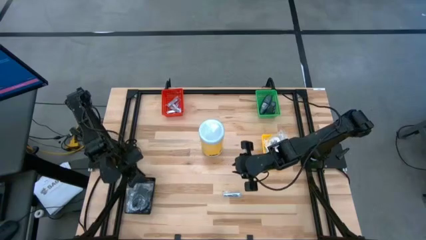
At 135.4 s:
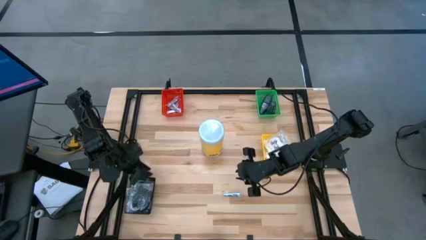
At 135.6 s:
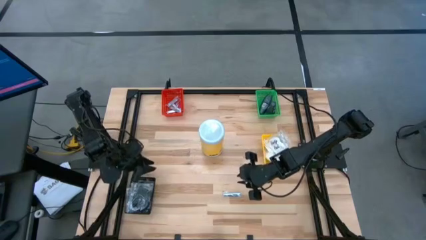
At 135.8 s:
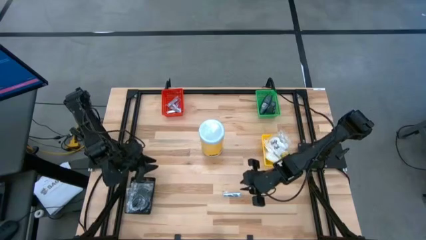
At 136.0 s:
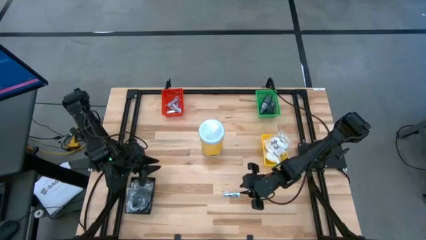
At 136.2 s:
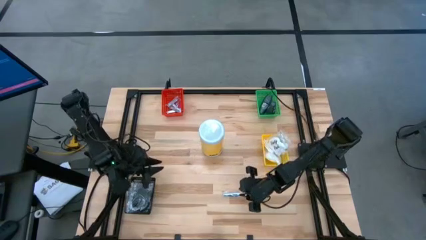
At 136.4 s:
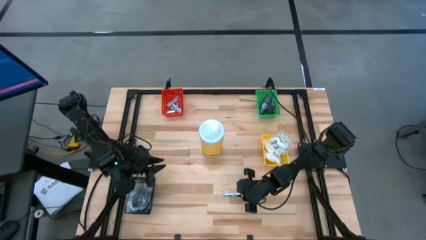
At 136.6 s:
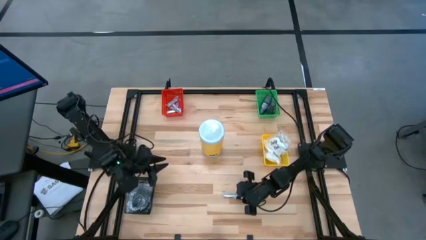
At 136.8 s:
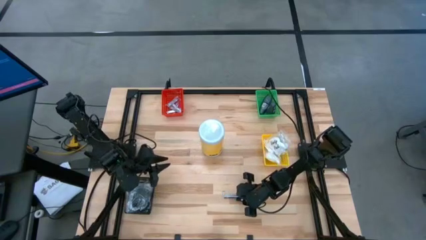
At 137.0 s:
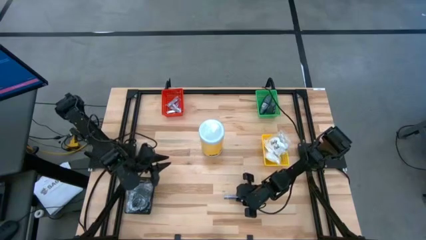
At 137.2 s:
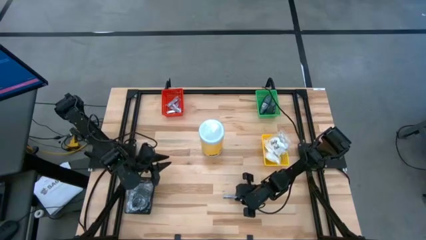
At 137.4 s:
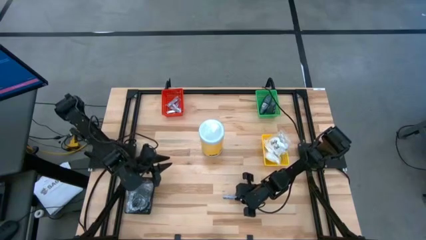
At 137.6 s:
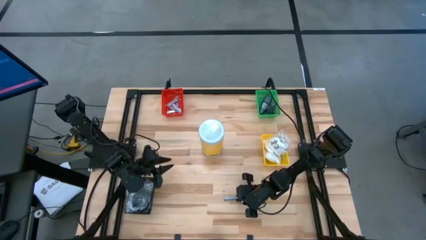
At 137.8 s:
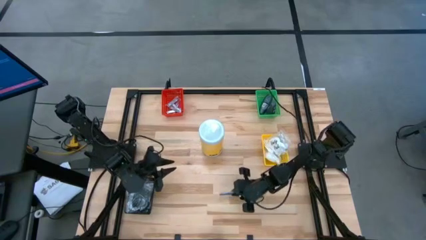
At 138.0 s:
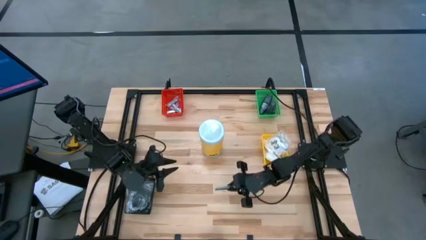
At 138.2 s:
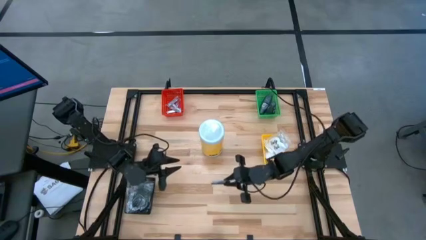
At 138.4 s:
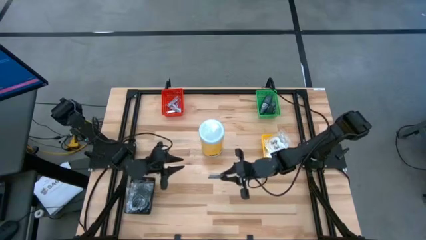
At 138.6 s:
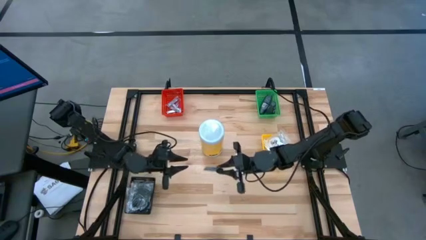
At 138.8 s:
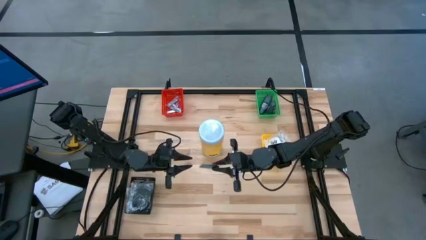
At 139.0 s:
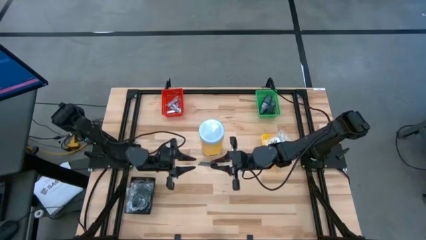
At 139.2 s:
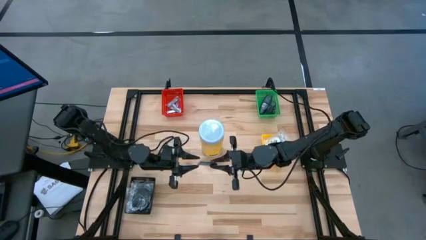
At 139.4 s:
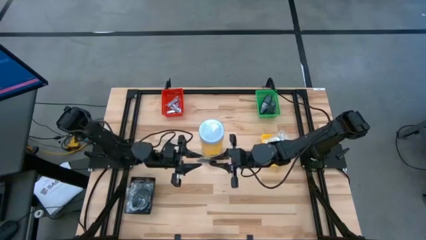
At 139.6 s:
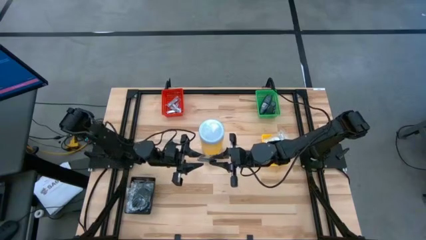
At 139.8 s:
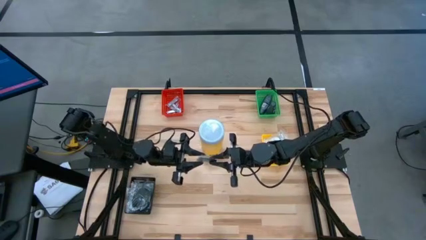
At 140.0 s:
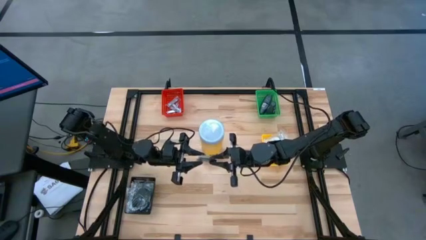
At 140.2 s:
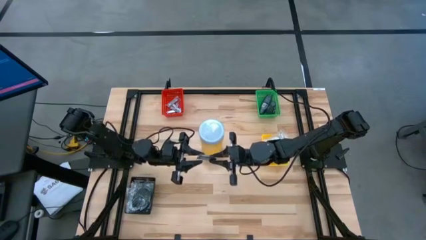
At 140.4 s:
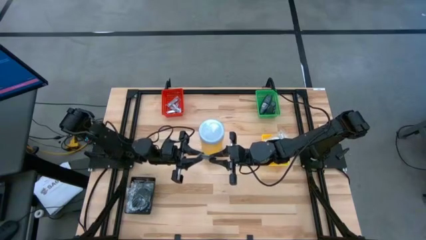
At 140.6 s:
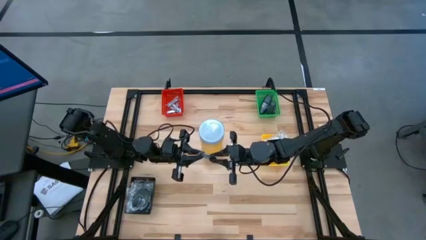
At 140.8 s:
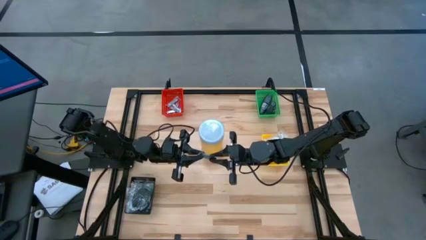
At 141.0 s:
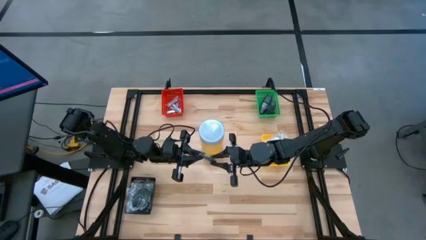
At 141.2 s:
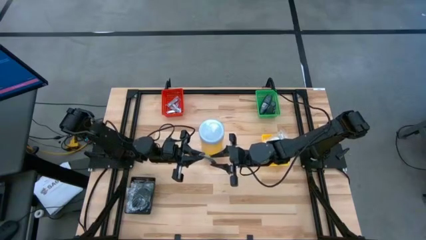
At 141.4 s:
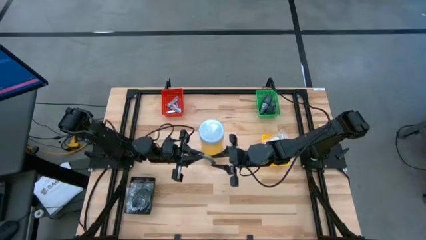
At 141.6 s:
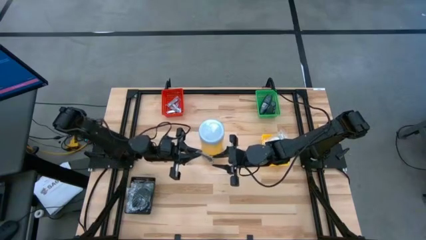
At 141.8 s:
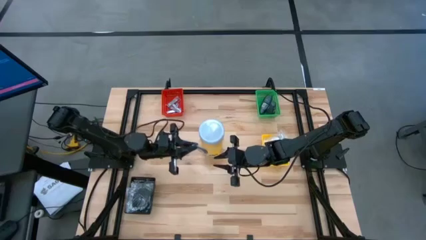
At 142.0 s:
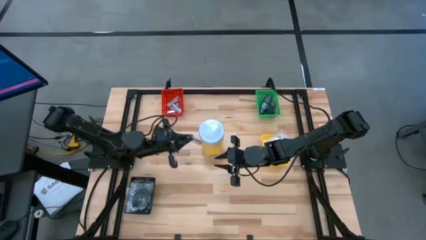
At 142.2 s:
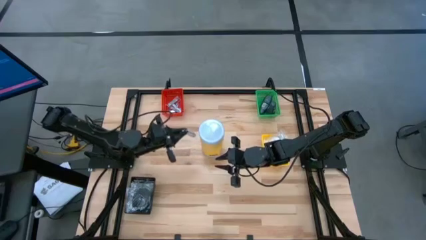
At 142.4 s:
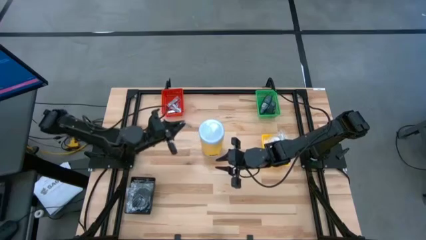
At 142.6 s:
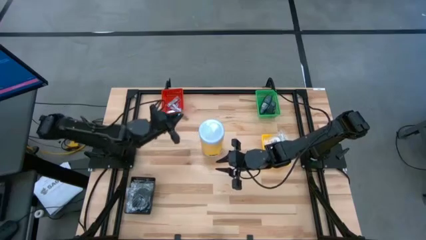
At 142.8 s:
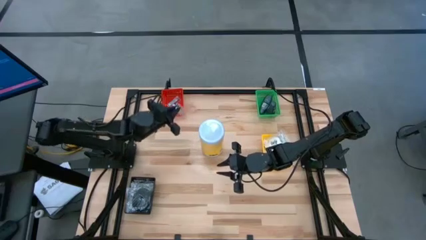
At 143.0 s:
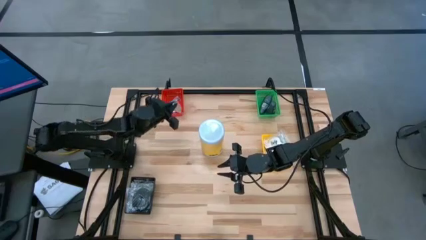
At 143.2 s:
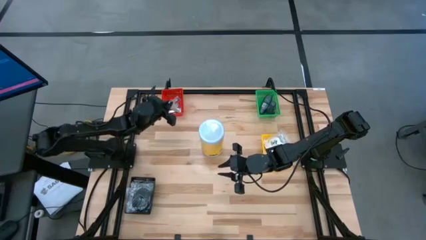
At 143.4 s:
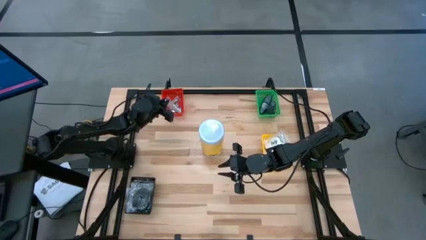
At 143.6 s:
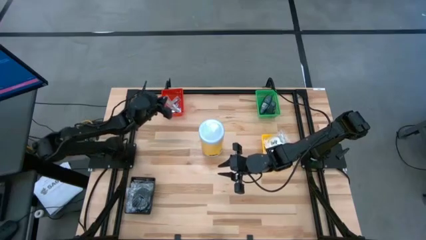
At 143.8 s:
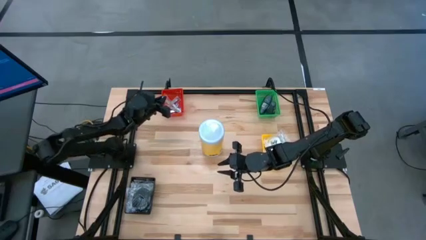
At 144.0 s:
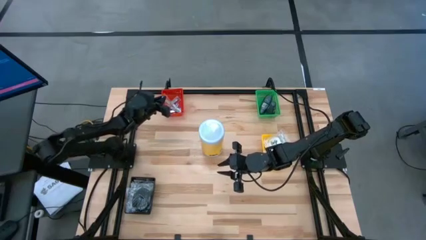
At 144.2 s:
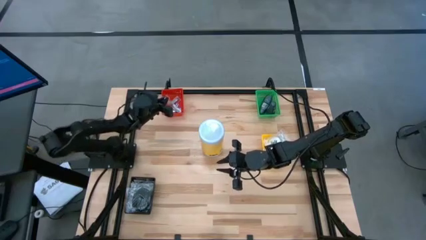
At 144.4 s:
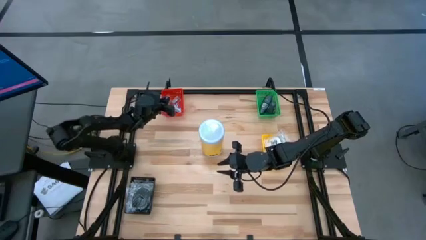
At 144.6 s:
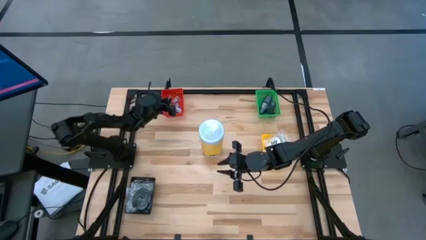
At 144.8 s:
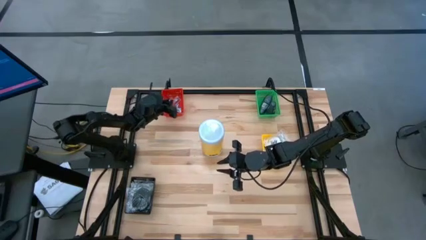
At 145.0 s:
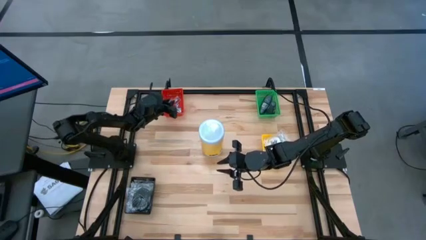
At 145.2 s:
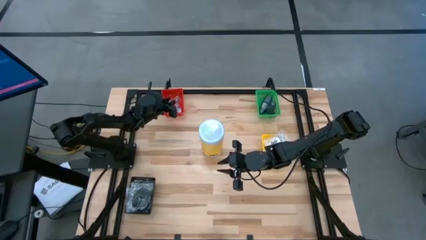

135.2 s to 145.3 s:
Task: Pick & Place Travel size toiletries
Put the silver nail cutter into the red bin

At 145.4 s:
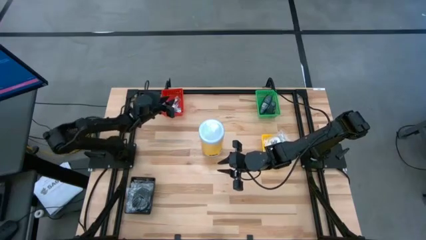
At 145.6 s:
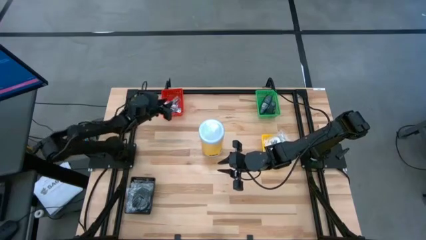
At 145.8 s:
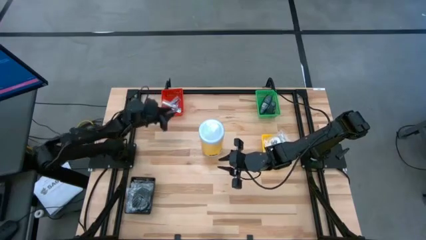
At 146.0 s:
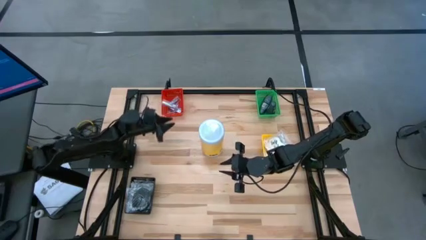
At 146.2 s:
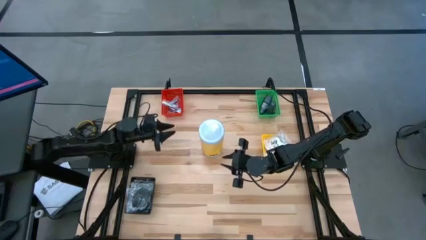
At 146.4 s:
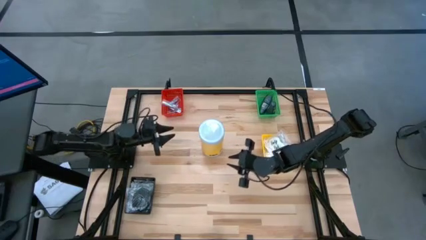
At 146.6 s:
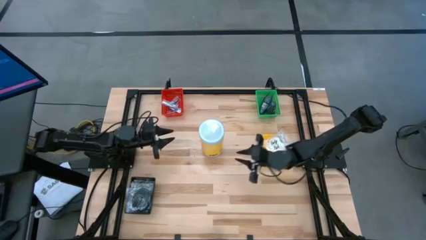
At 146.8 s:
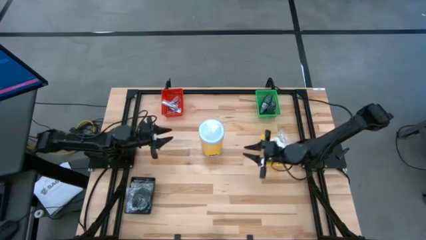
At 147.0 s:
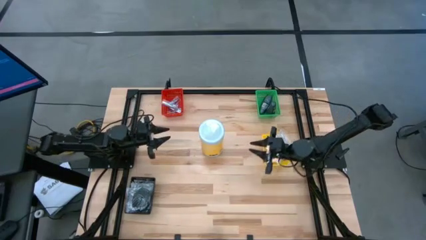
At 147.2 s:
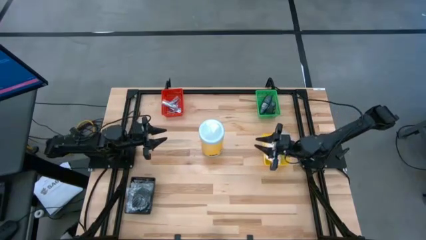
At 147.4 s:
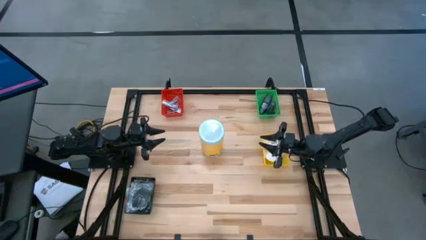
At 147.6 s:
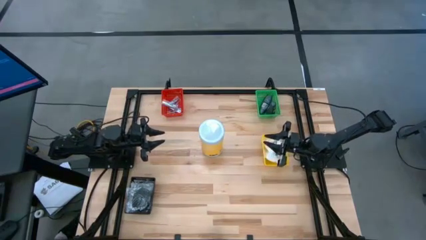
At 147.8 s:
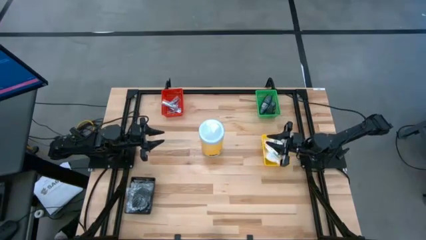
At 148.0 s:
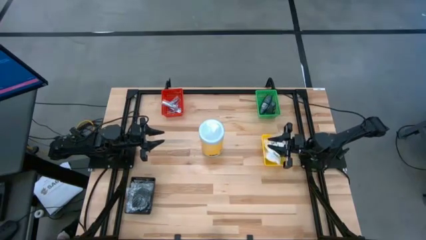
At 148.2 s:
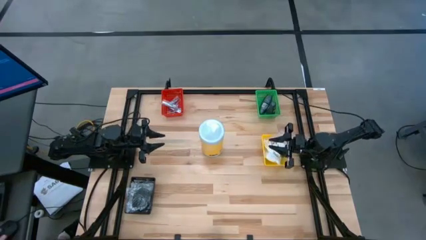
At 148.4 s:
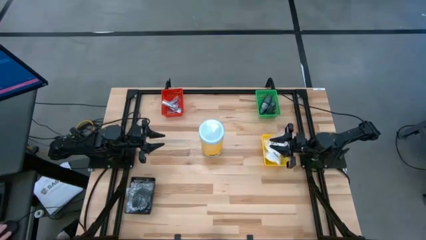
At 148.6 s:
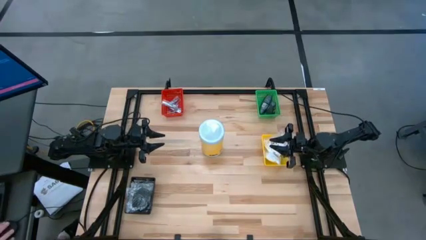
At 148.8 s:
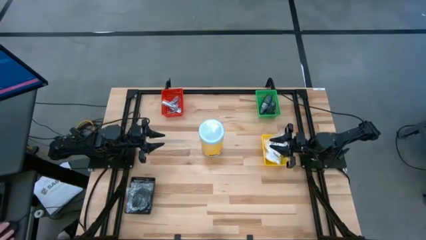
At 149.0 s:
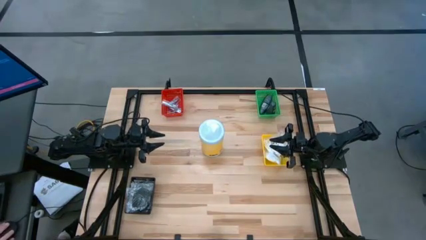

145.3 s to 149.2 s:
Return to Home Position
